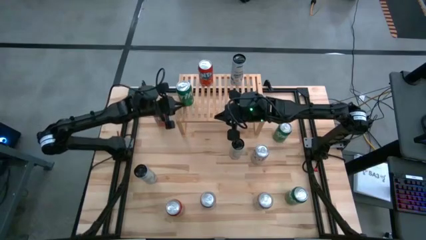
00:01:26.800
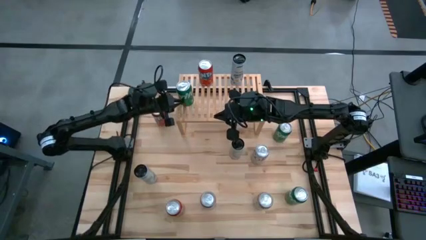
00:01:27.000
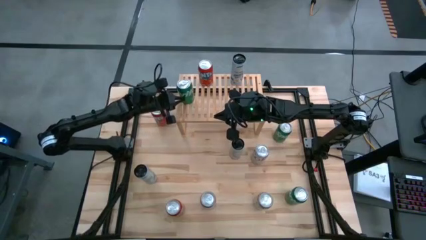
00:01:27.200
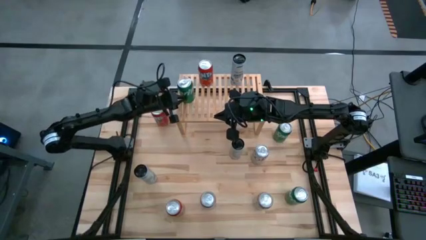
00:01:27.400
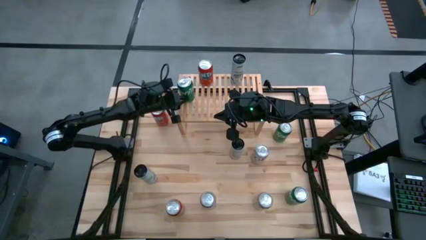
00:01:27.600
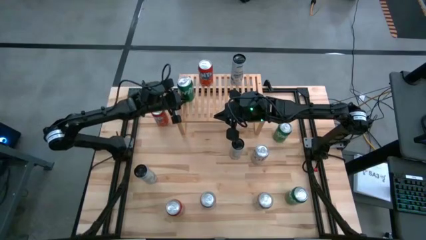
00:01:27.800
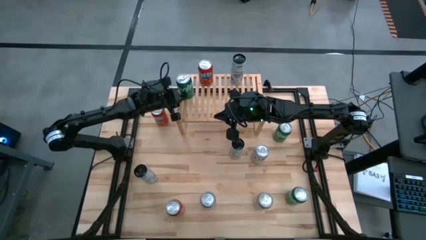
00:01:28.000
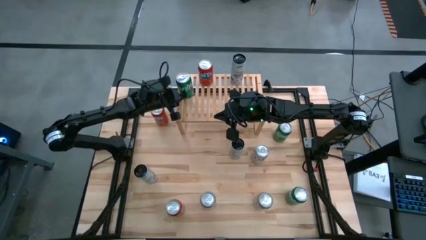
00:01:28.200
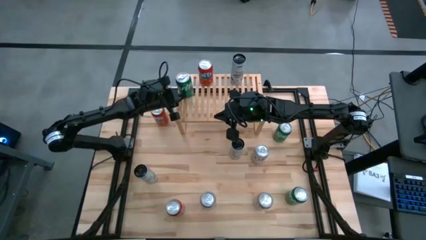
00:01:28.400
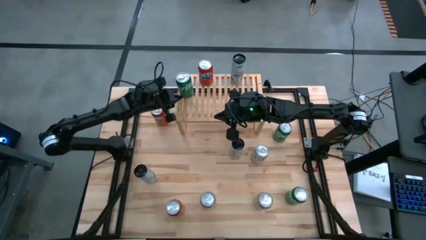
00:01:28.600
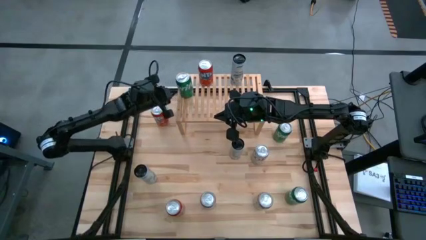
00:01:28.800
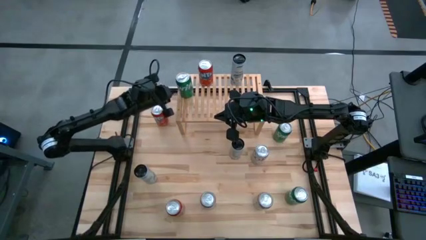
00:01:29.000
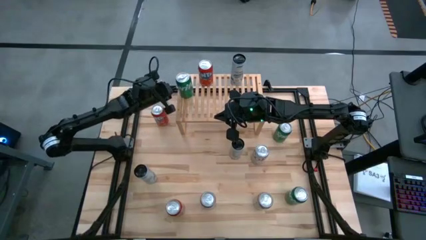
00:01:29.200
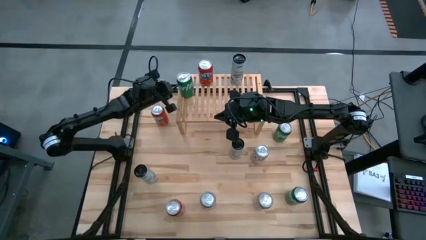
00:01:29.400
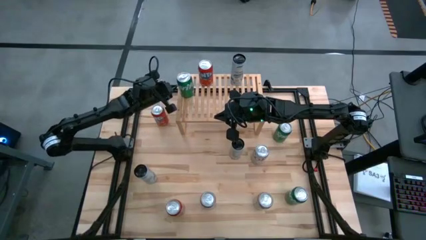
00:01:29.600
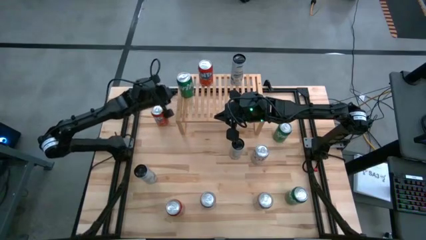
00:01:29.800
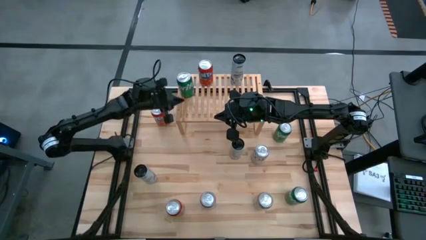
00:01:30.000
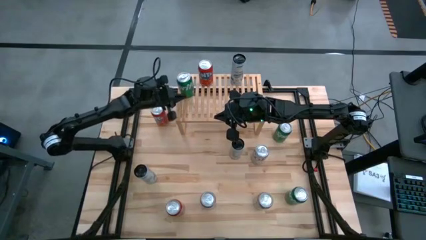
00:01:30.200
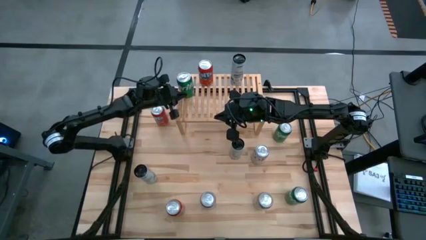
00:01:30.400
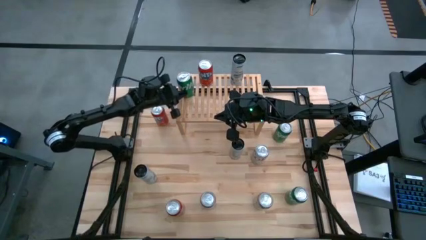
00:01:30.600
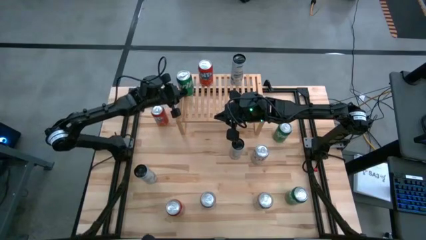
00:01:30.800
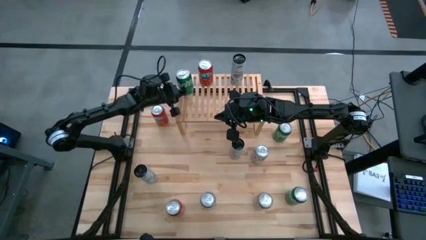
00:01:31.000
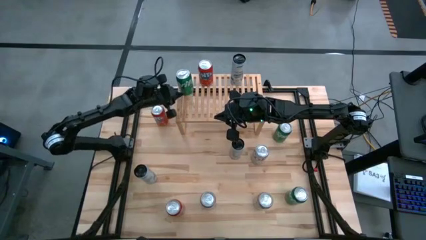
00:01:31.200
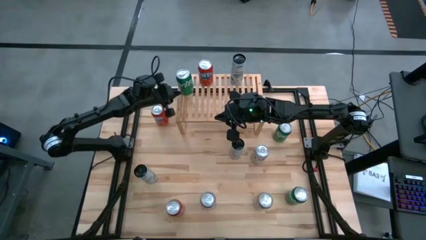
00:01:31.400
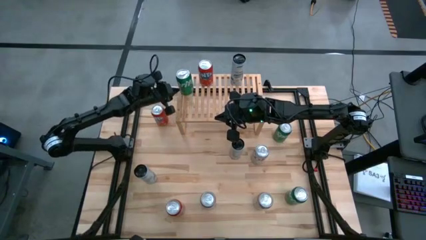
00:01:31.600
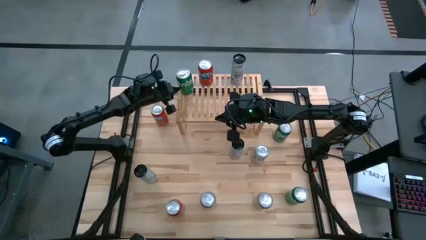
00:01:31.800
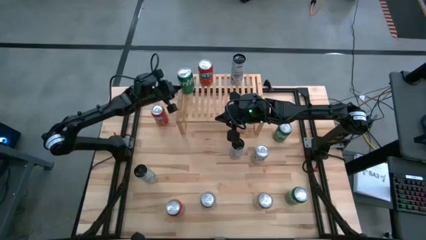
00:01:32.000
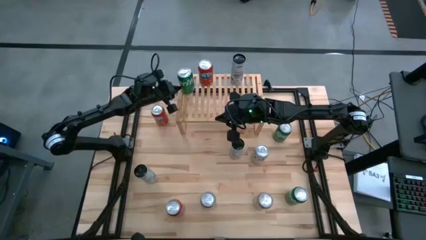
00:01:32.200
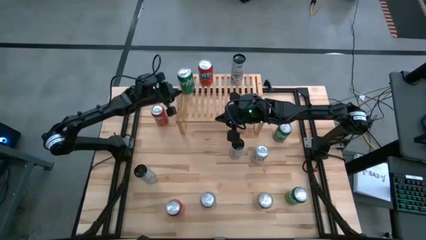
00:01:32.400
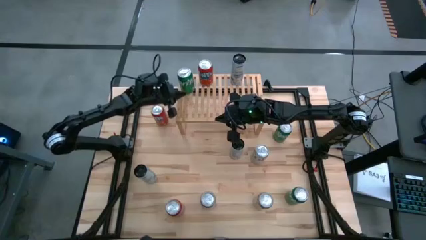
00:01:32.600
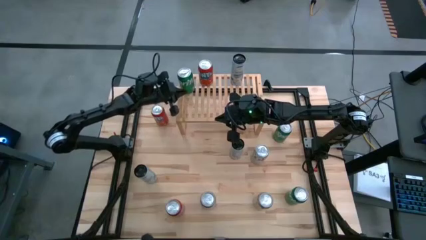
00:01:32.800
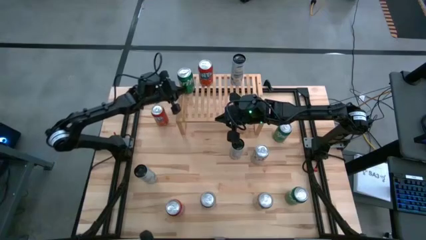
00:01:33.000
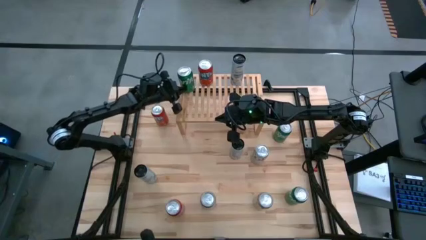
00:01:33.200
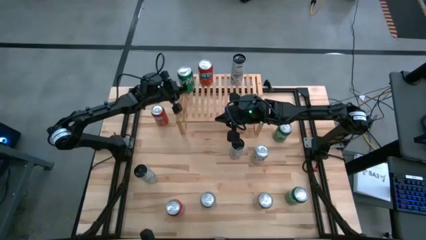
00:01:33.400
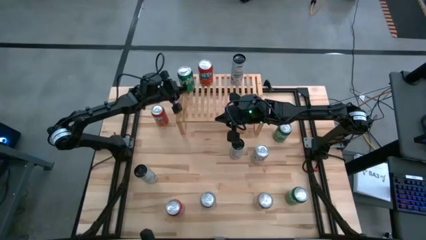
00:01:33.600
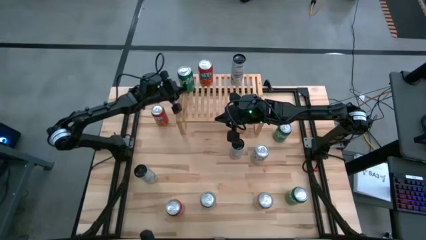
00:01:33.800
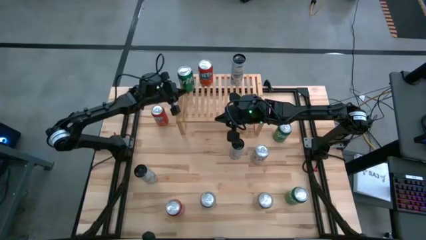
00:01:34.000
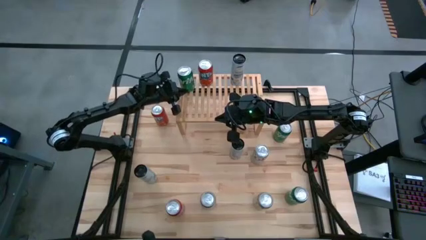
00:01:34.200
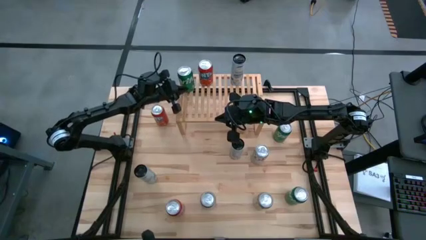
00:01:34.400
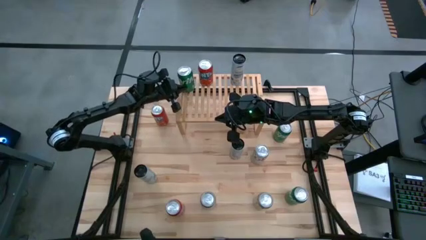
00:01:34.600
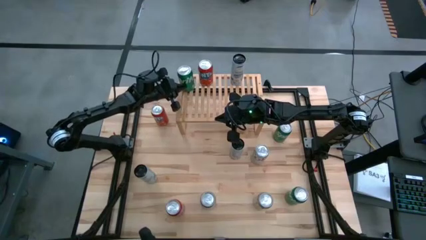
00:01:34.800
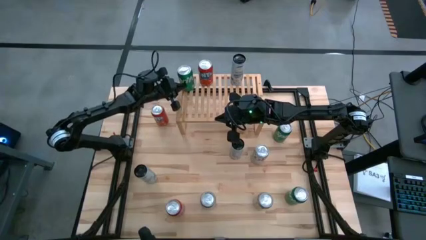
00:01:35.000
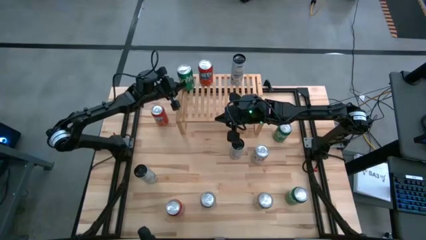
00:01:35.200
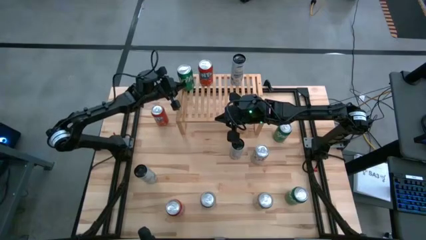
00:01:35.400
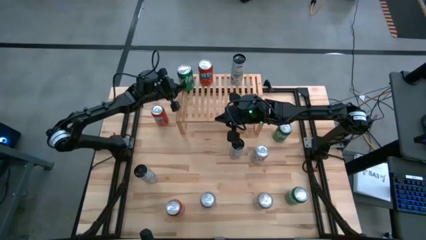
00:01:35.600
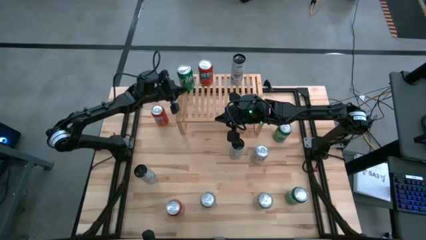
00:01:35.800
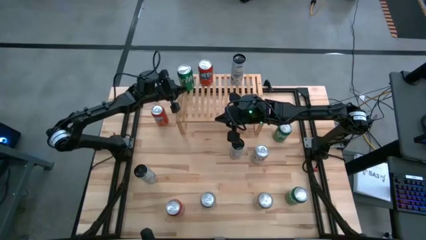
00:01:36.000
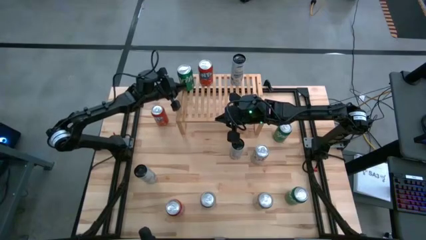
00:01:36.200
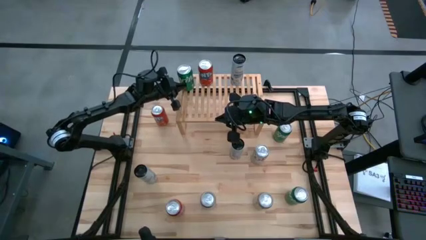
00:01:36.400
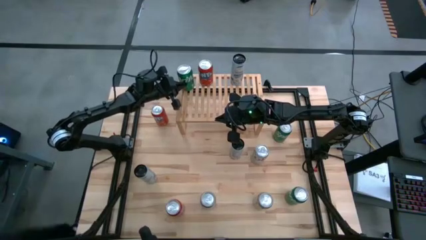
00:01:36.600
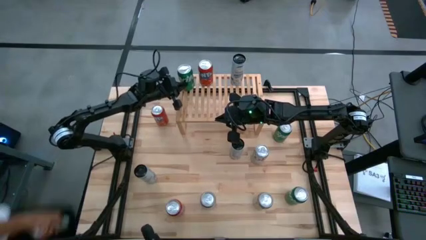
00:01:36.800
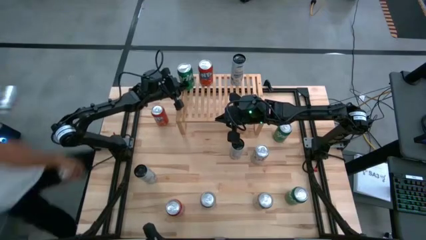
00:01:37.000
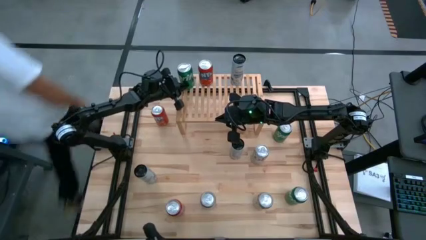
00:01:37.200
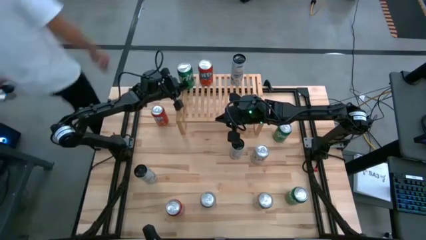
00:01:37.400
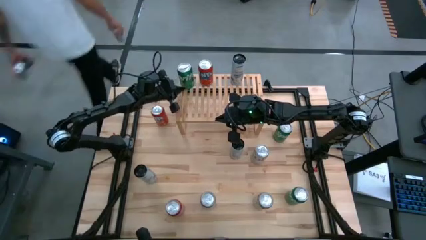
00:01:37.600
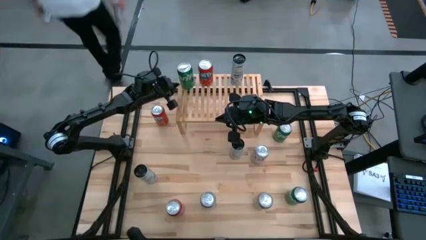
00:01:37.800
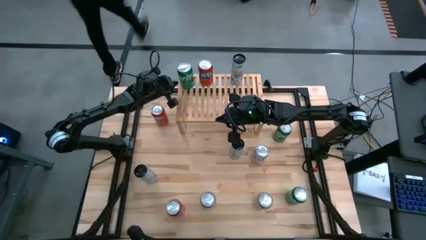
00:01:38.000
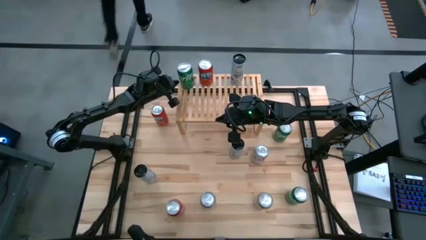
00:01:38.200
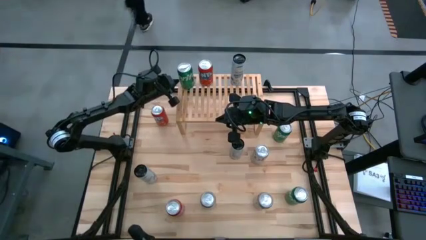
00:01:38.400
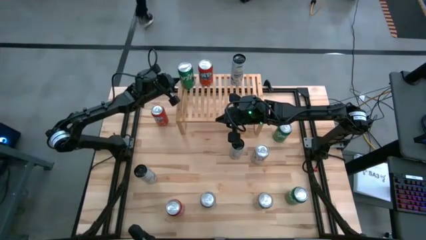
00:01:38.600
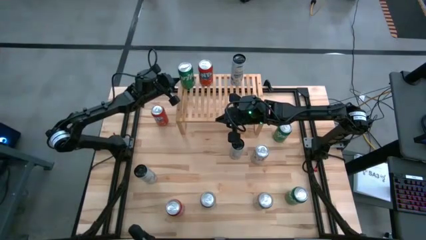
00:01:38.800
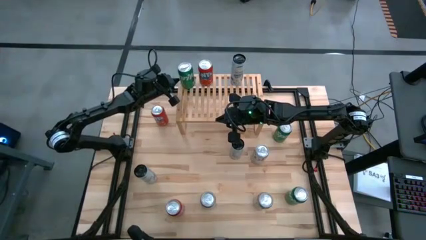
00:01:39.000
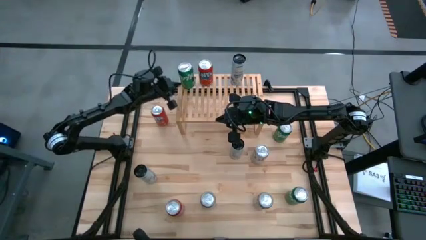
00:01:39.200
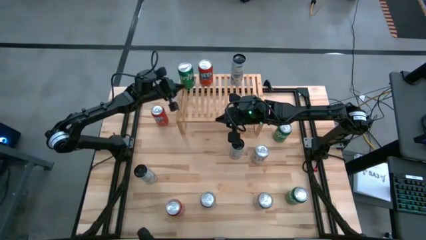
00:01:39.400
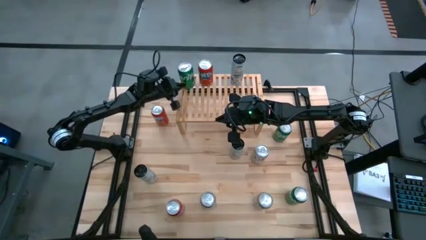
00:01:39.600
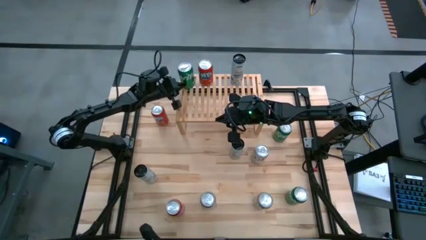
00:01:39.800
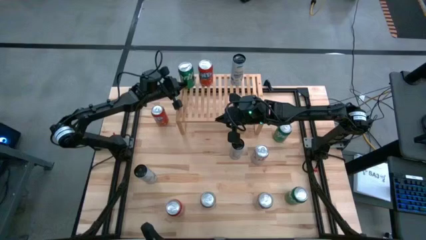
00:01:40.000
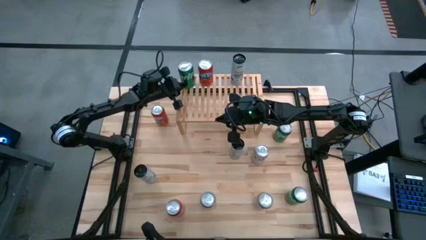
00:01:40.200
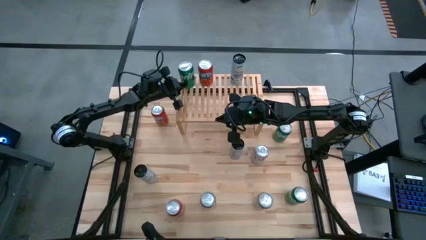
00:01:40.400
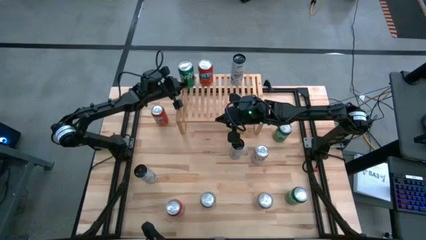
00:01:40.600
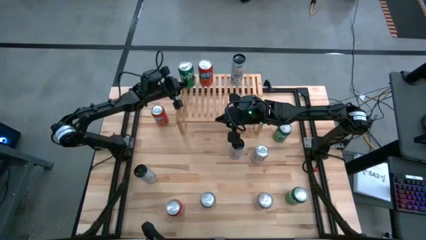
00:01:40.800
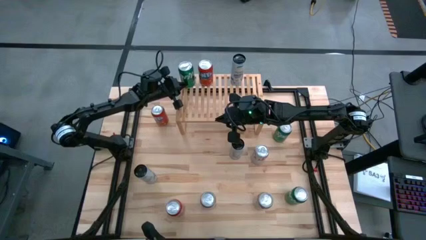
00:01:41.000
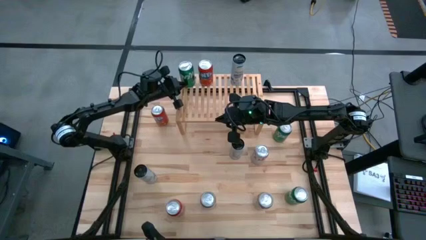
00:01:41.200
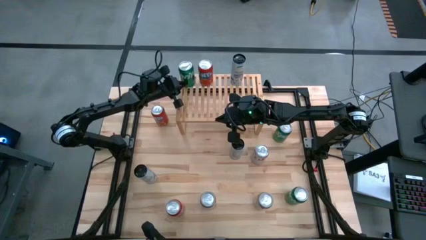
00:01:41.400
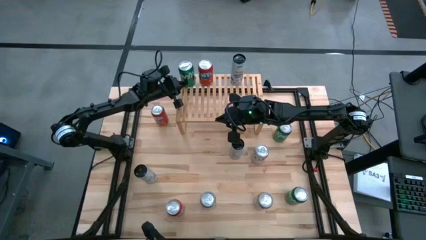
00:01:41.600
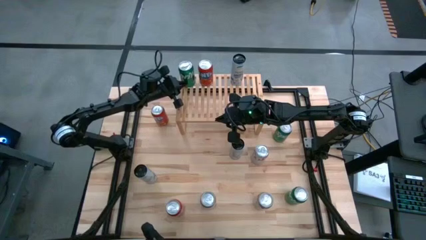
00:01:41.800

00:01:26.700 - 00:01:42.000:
Task: Place canned beverage on shelf
Put the middle left green soda can on the shelf
